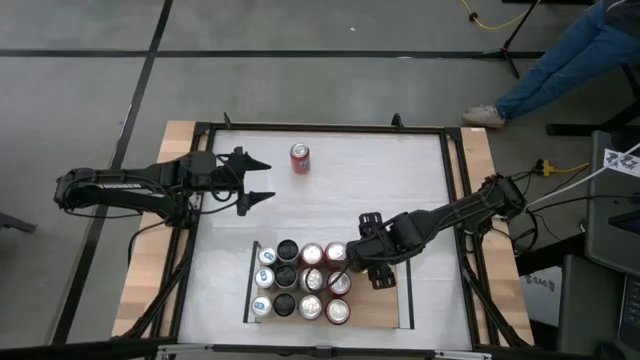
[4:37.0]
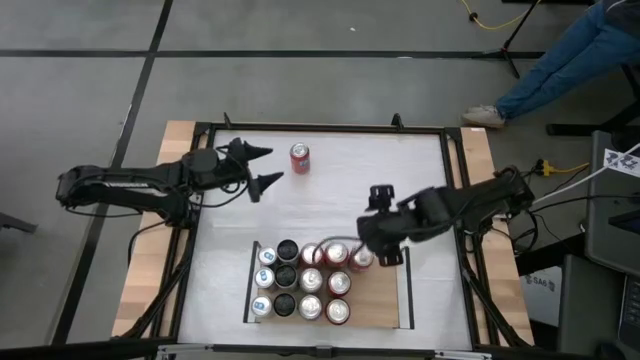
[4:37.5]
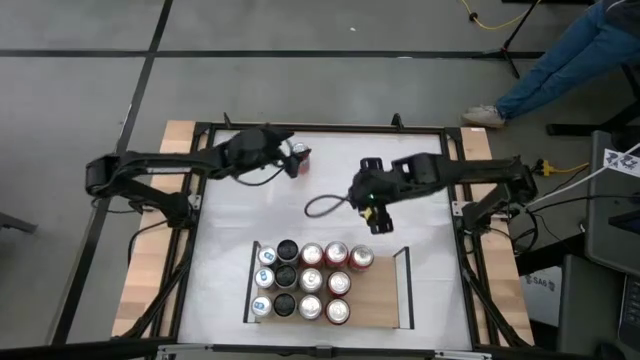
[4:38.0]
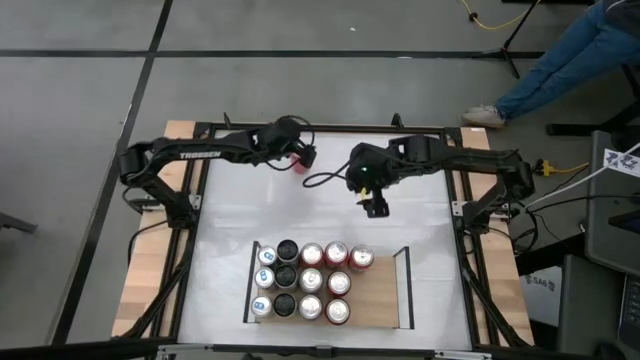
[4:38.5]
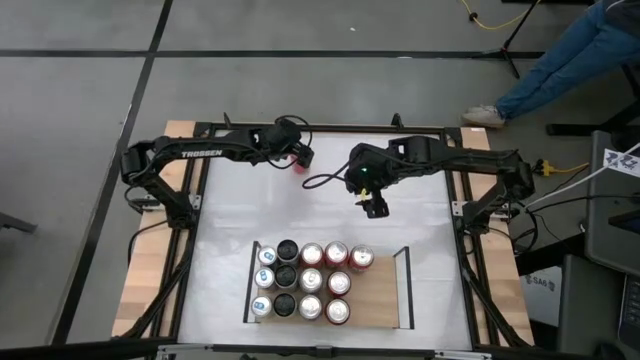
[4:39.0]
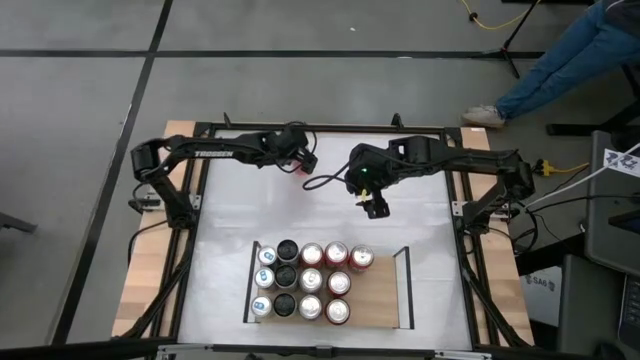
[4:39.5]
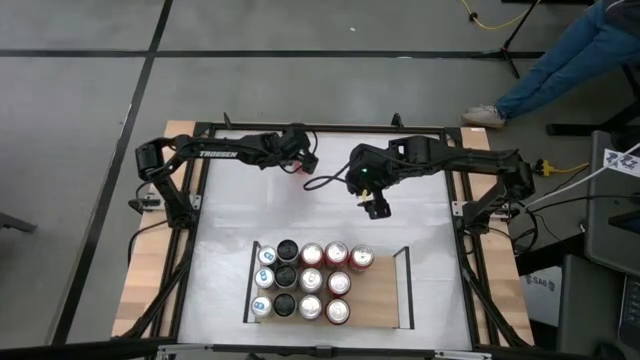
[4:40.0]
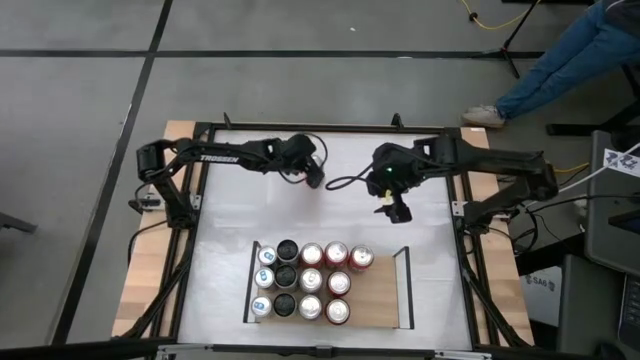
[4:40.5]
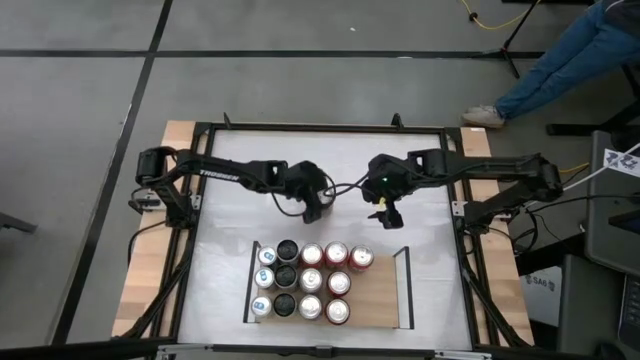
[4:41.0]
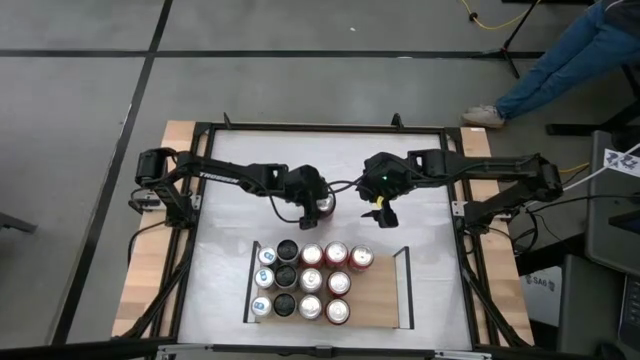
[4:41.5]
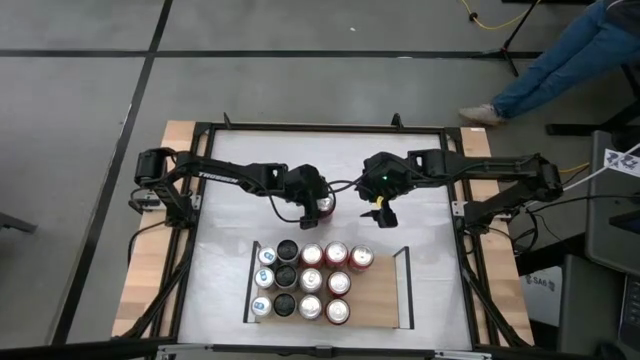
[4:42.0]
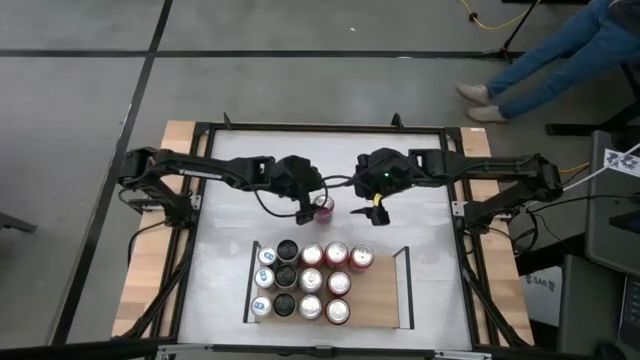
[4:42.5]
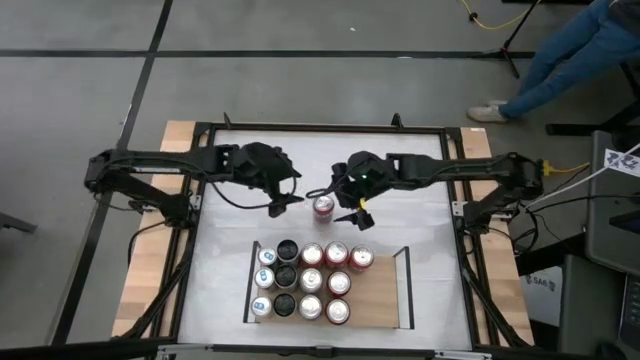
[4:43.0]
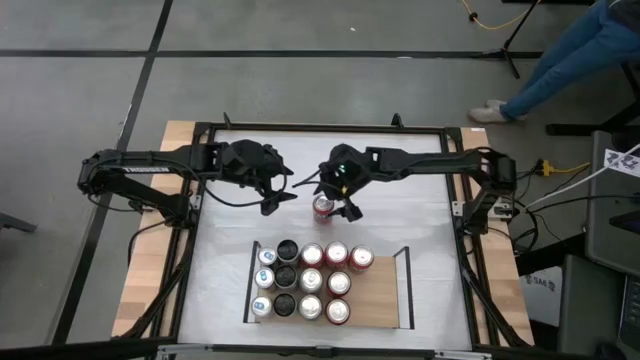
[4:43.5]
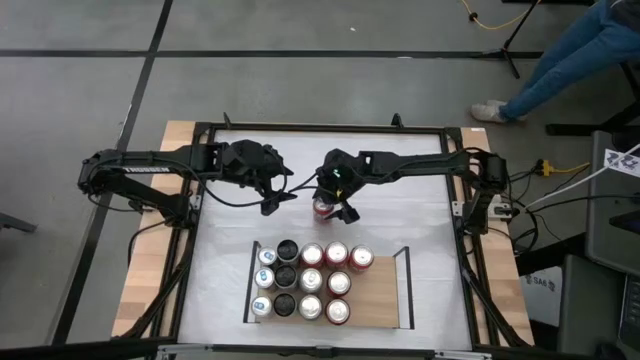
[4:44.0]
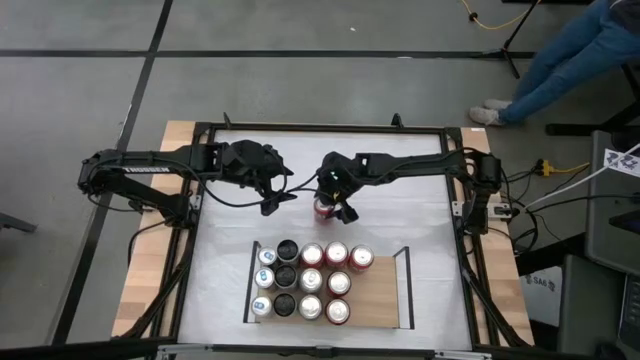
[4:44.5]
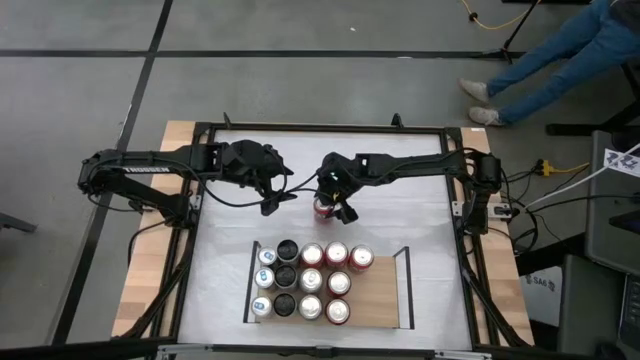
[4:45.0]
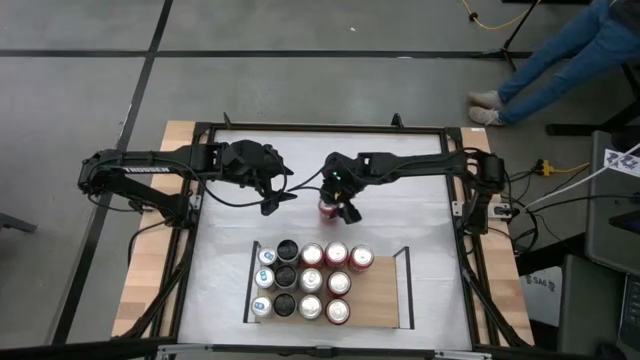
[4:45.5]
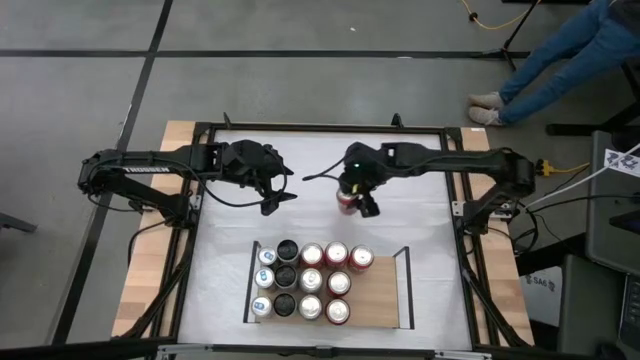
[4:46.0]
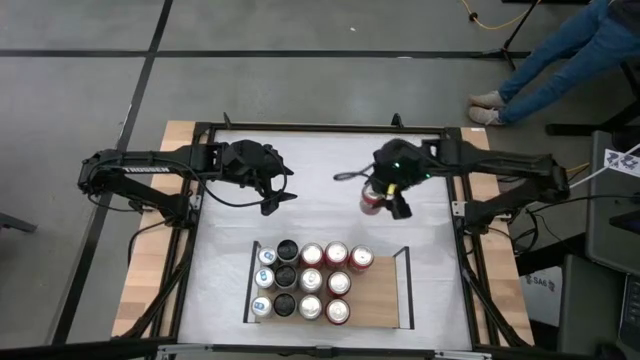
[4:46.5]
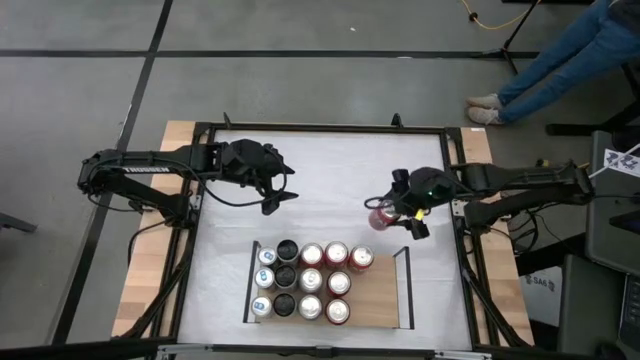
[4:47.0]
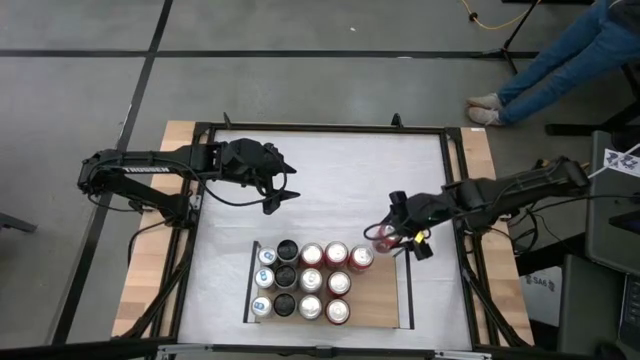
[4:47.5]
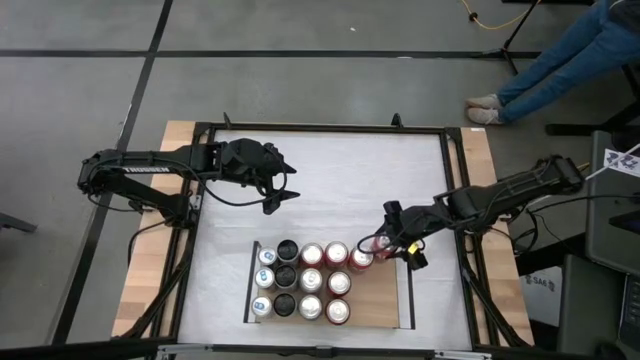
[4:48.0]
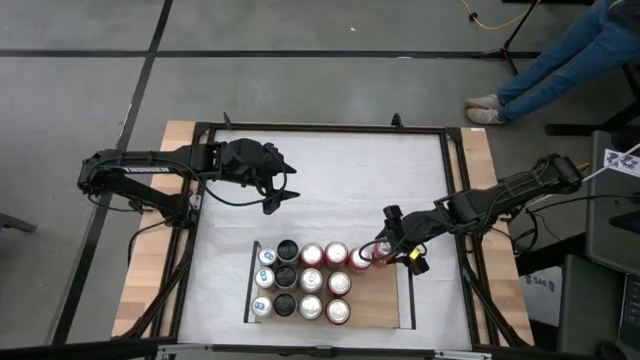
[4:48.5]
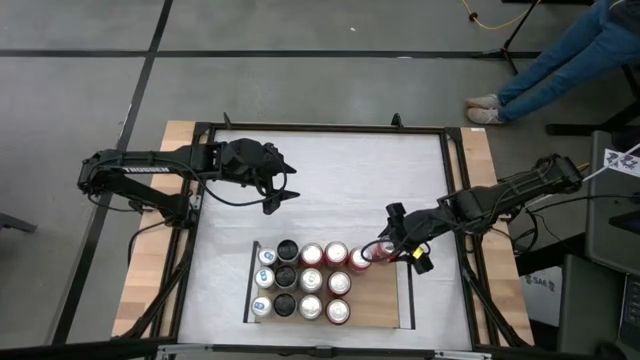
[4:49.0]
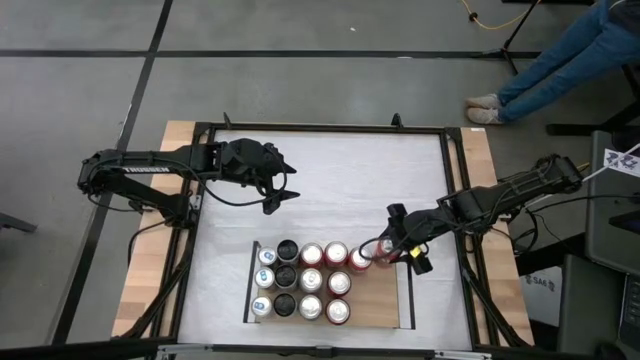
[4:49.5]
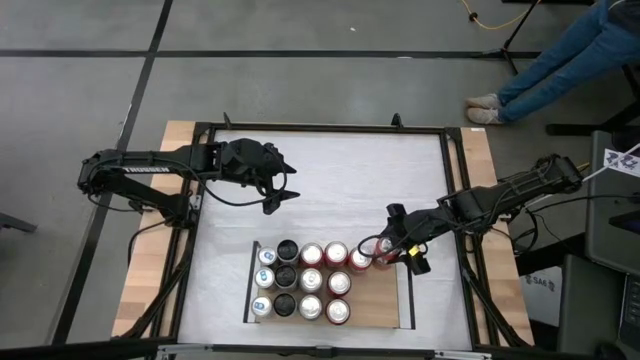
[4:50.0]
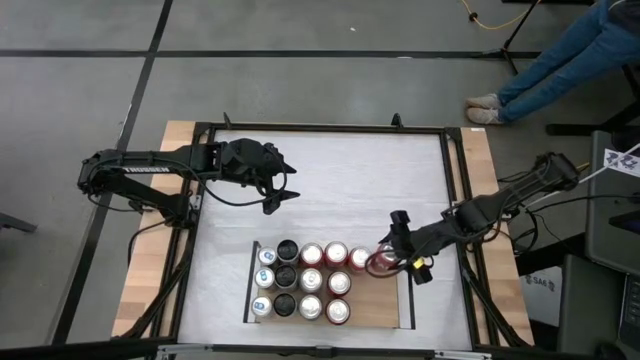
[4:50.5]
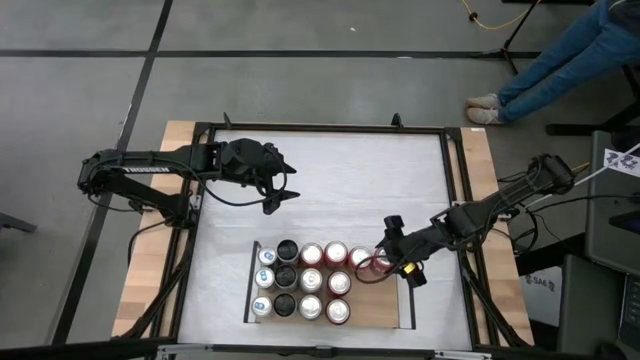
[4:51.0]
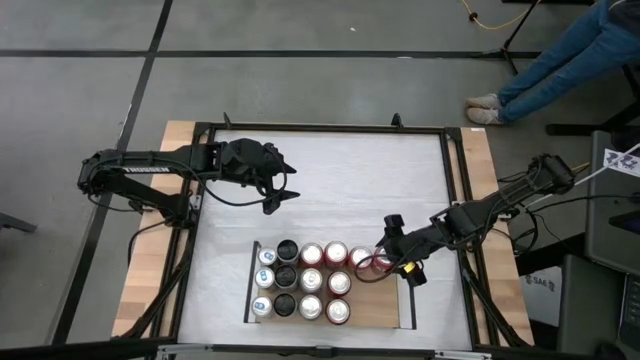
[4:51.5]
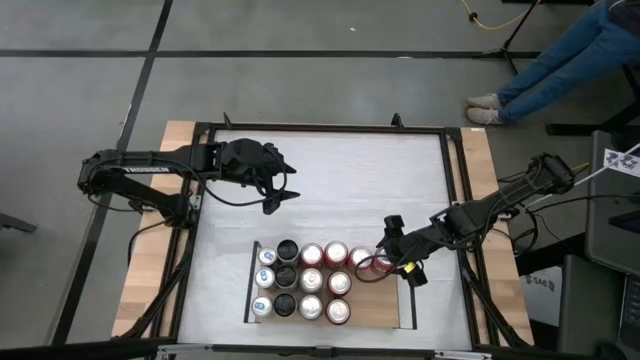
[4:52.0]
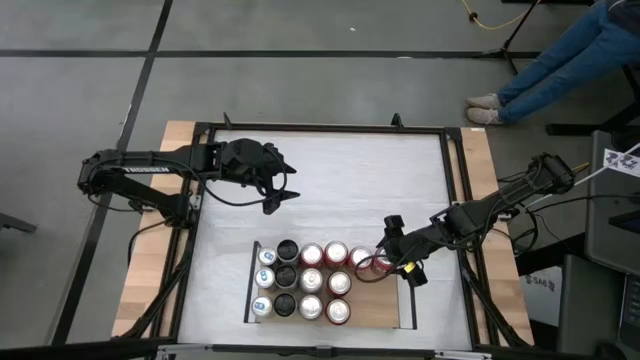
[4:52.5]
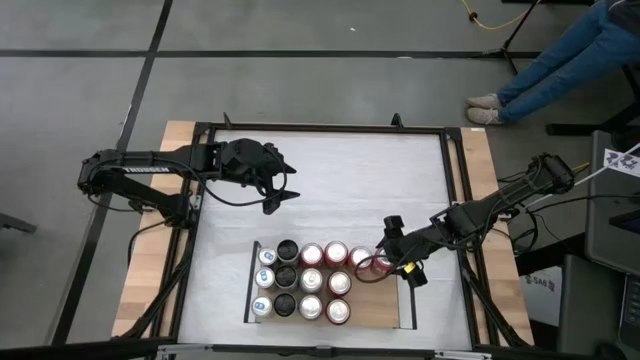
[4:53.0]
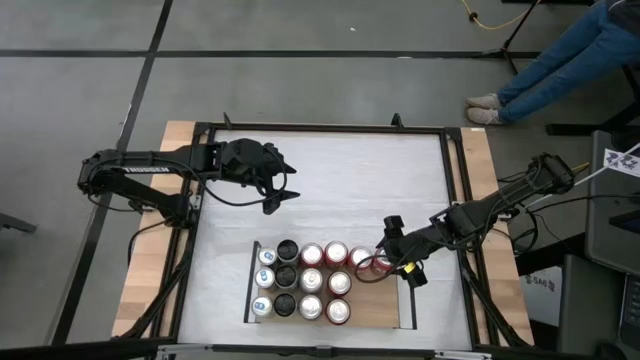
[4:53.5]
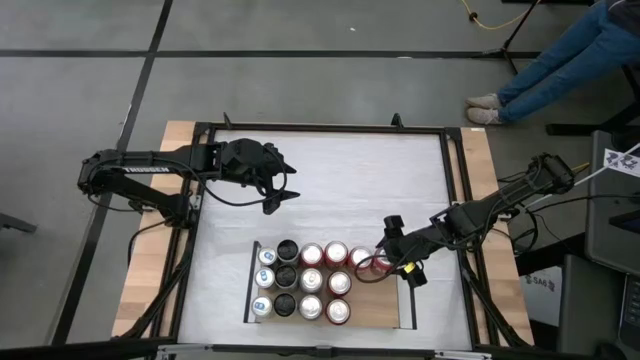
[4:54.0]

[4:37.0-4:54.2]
Task: Place canned beverage on shelf
Put the red soda can on the shelf
